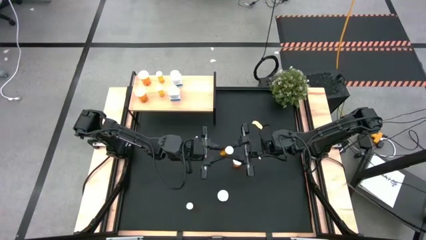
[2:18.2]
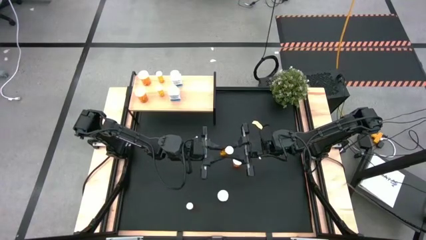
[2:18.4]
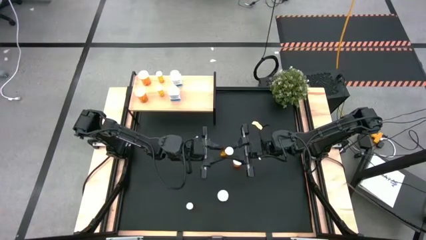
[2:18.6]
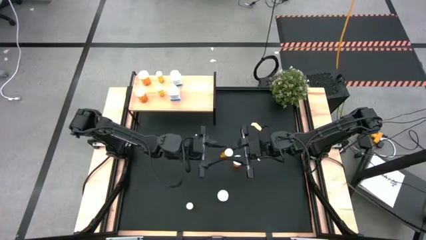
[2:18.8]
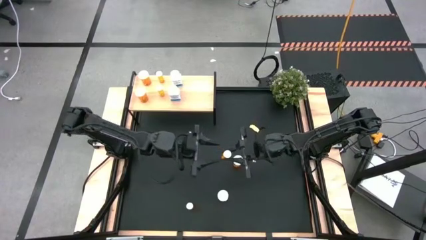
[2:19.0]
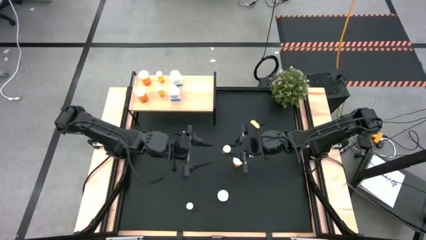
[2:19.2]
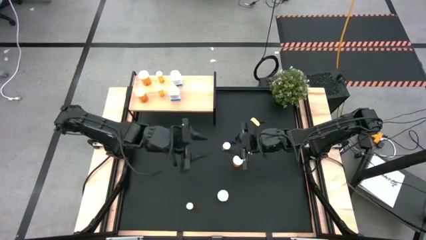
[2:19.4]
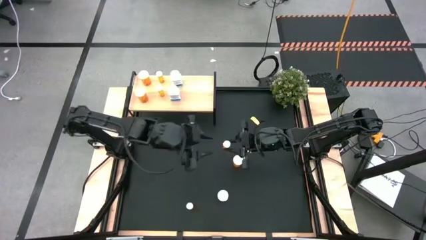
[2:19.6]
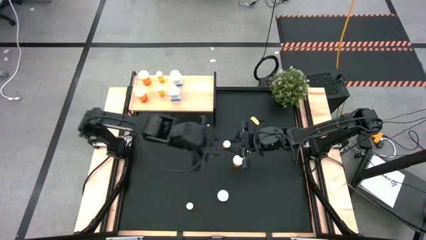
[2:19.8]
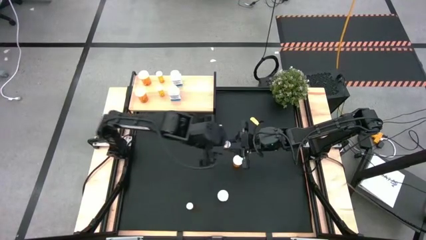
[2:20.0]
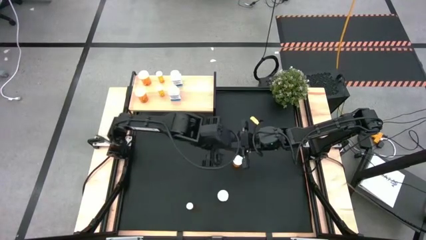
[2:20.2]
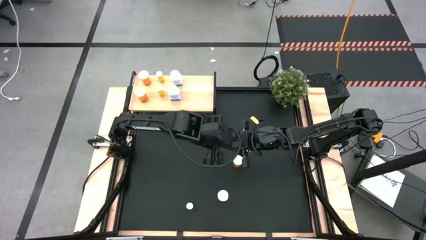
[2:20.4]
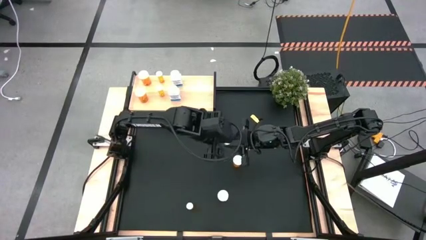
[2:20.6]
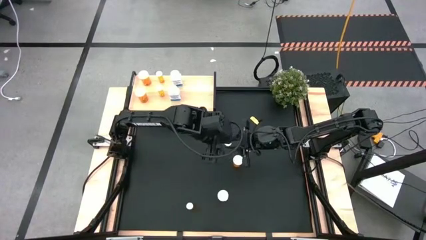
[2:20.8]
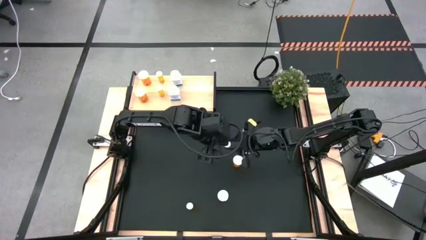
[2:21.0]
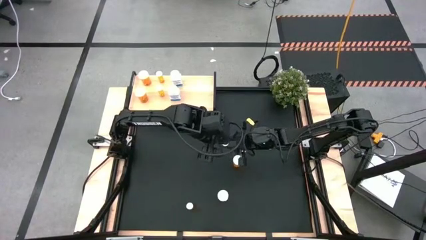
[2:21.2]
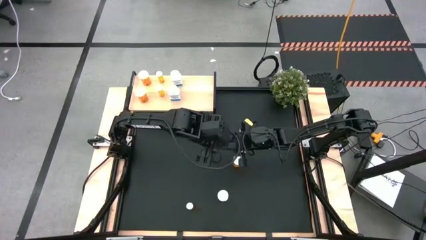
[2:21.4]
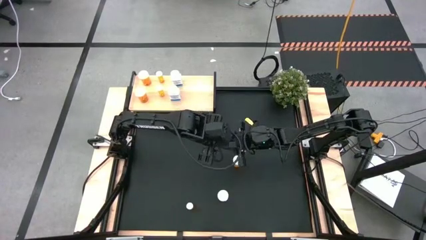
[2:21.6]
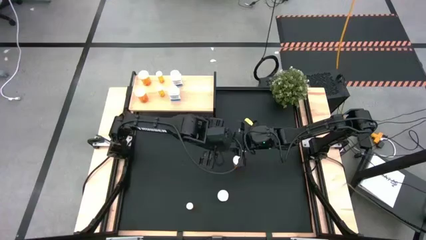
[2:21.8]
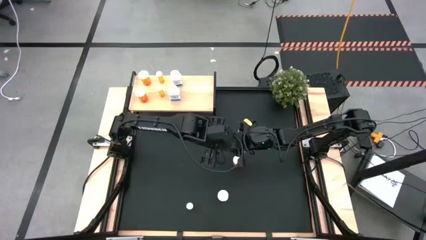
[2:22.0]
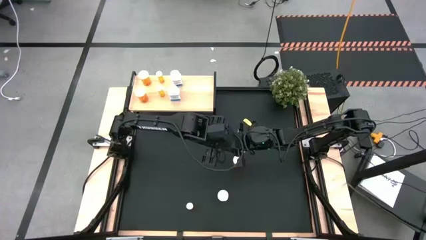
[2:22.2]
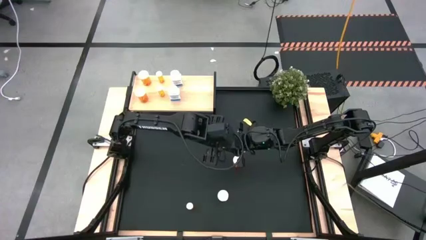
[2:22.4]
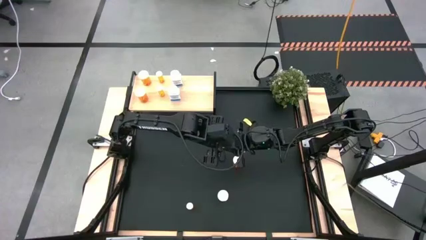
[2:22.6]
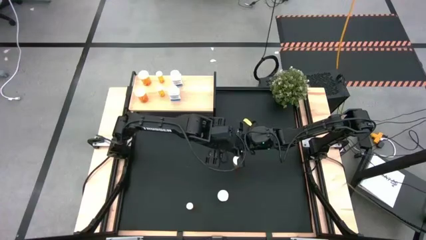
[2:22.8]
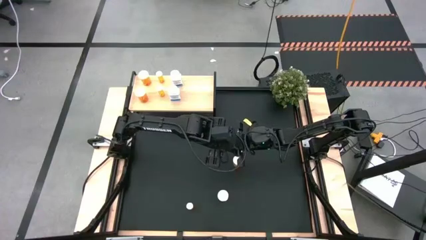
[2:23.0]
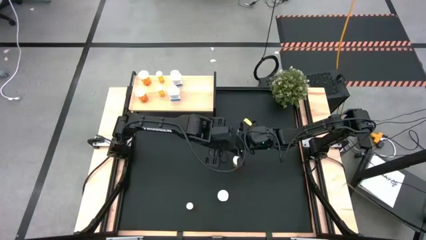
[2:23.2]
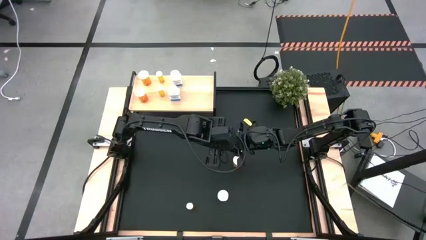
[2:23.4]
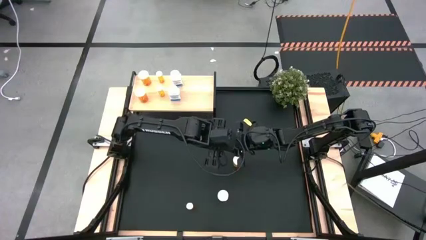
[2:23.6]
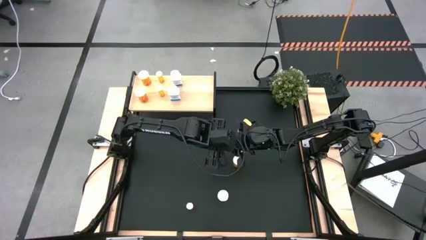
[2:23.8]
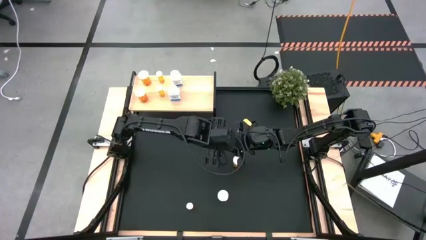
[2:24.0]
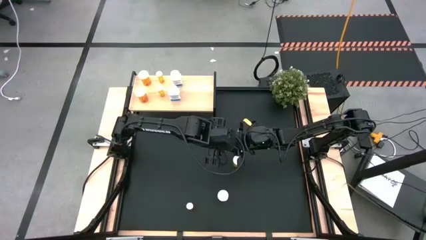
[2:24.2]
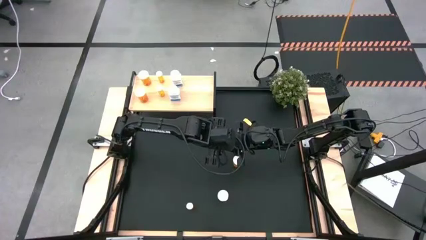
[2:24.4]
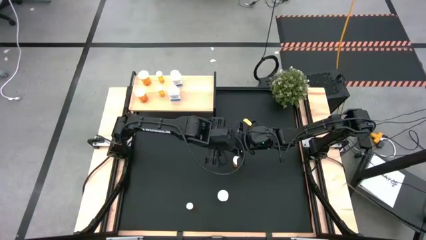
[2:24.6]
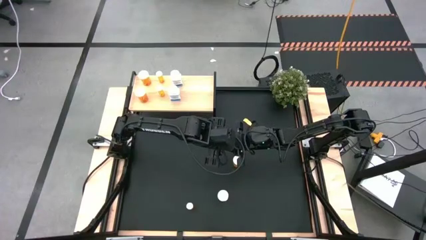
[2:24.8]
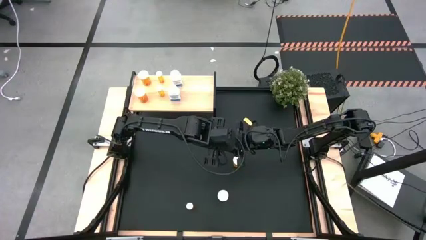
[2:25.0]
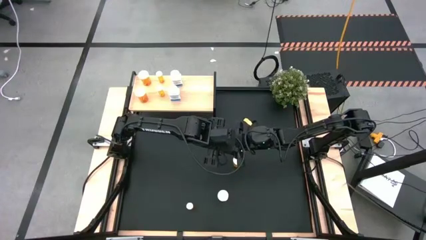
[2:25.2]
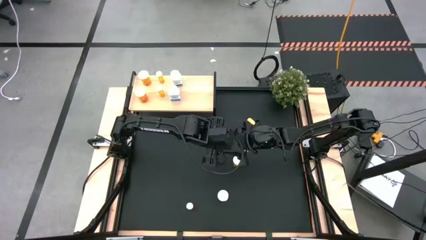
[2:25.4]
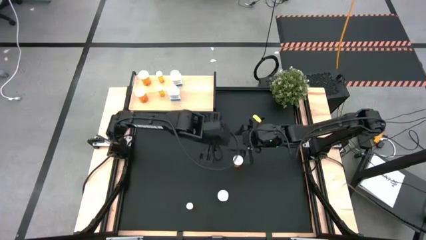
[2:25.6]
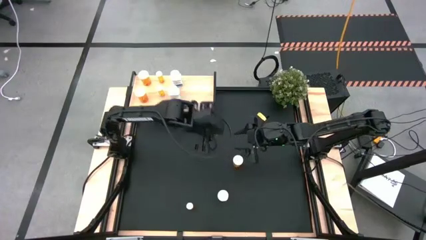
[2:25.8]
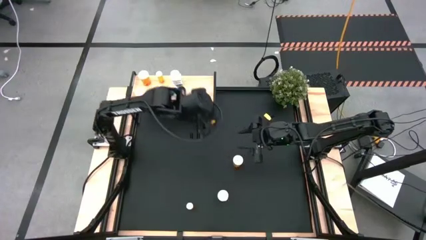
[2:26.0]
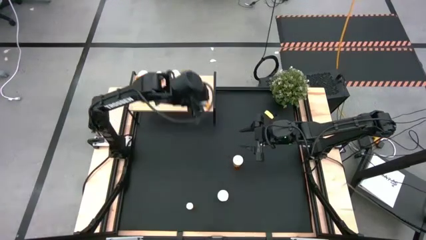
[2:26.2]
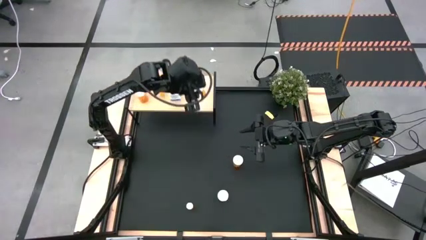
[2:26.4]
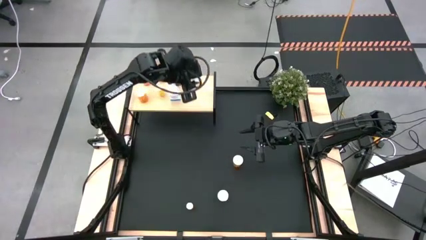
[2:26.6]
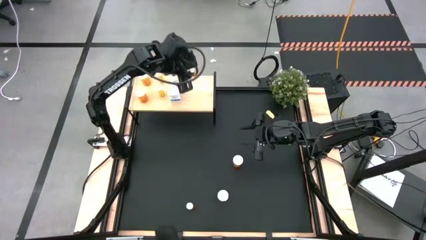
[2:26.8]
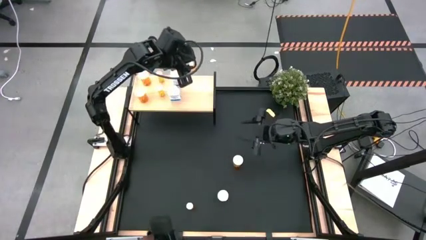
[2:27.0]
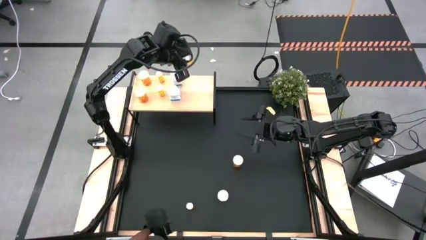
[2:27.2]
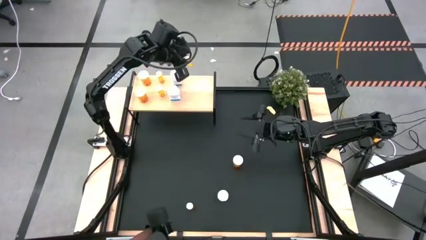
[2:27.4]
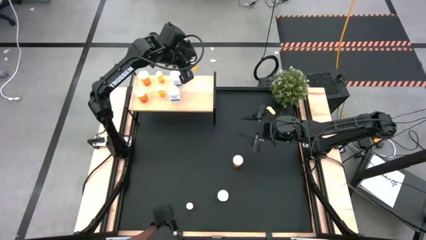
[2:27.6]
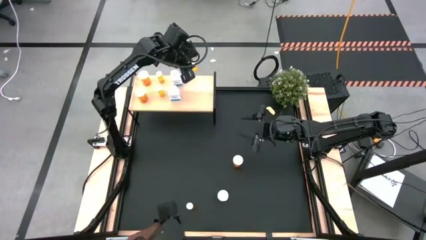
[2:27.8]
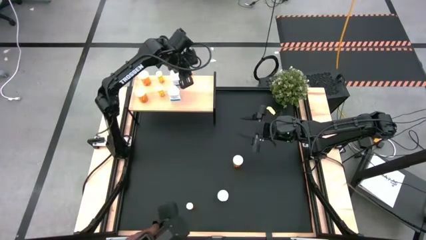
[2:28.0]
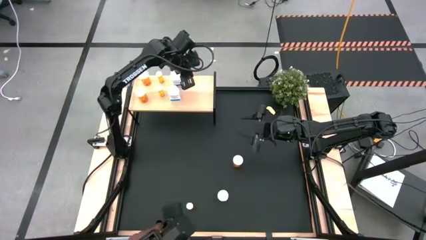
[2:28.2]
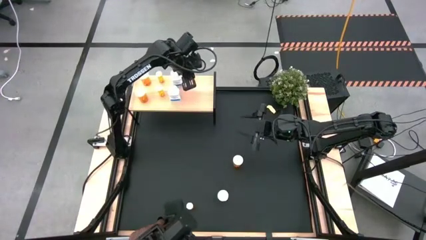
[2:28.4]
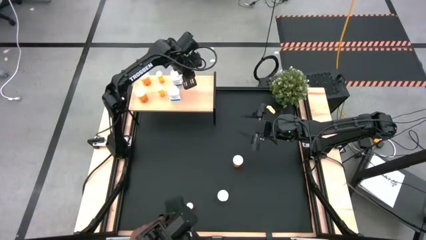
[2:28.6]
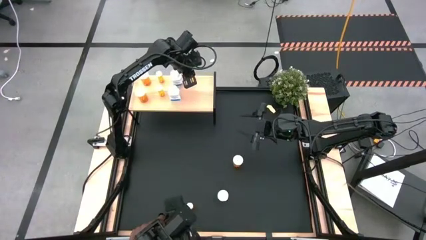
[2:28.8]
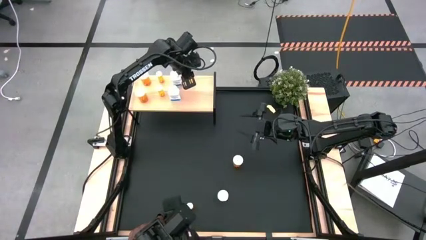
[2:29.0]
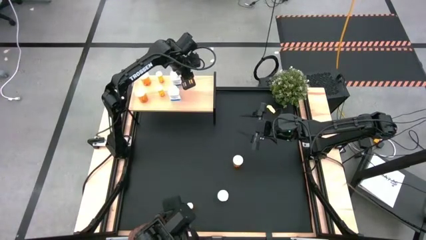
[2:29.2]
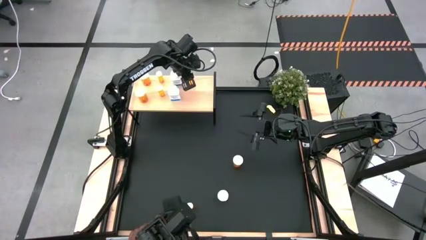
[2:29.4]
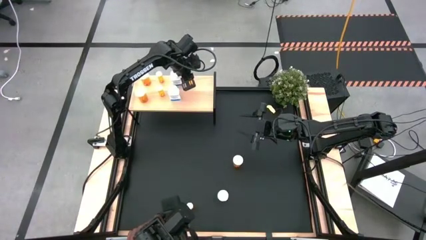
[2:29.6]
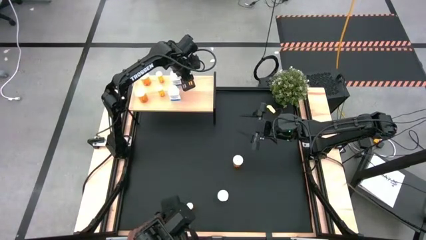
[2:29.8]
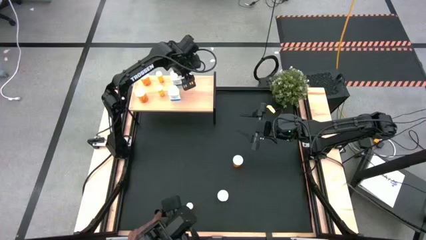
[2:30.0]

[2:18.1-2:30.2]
Task: Pick and place medicine bottles onto shelf by color
Put the small orange pill bottle on the shelf
